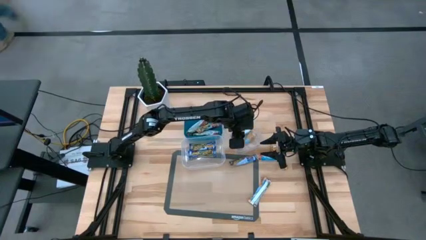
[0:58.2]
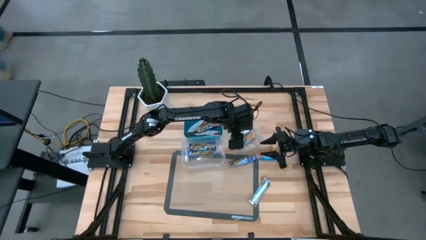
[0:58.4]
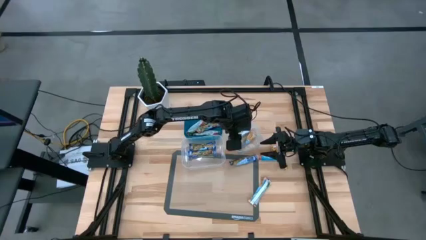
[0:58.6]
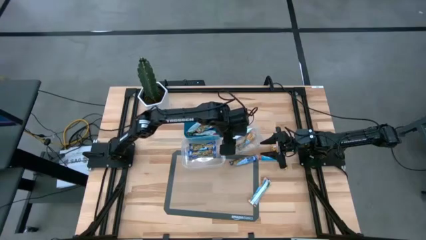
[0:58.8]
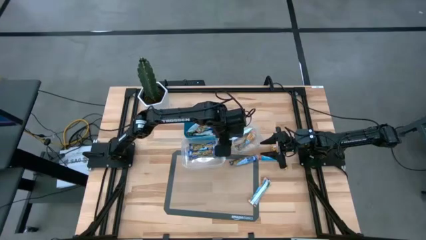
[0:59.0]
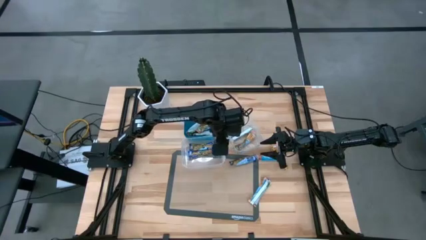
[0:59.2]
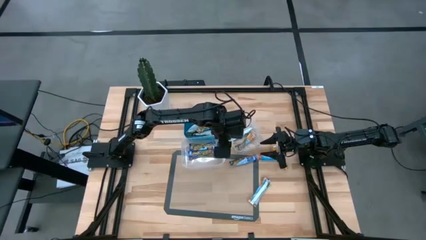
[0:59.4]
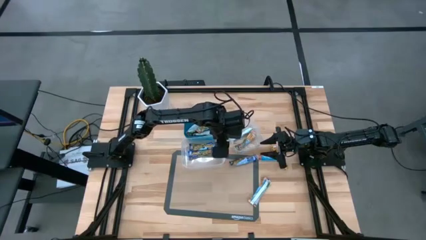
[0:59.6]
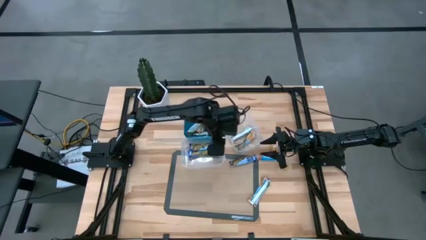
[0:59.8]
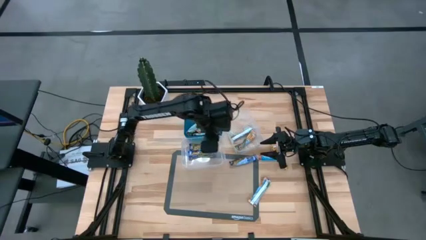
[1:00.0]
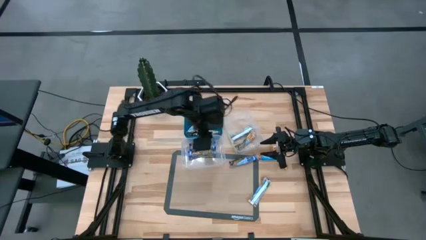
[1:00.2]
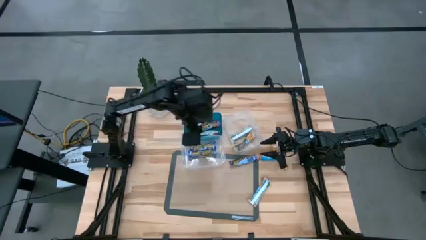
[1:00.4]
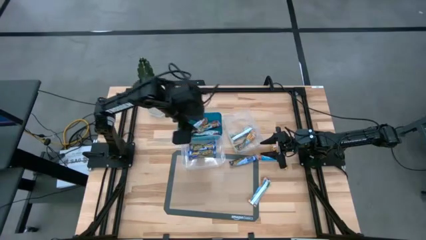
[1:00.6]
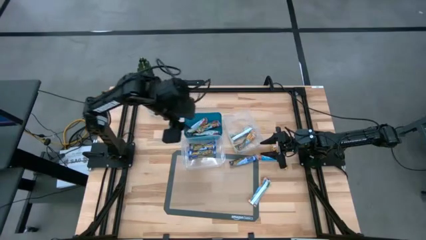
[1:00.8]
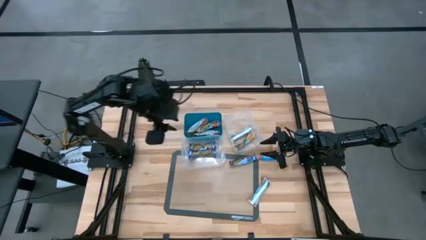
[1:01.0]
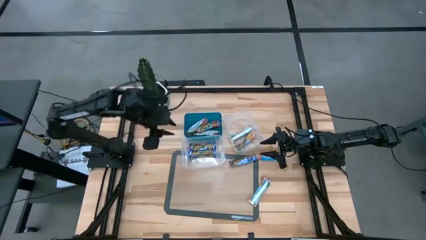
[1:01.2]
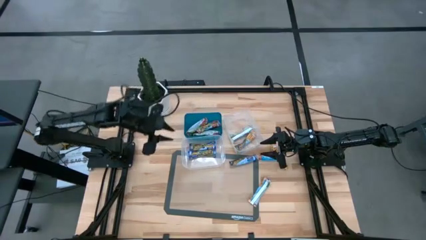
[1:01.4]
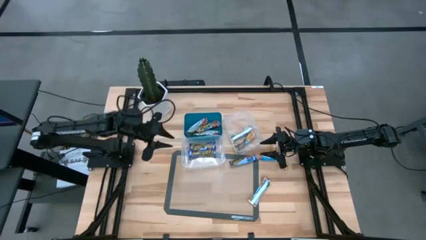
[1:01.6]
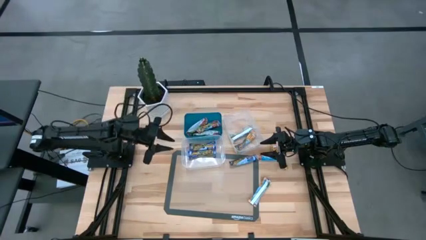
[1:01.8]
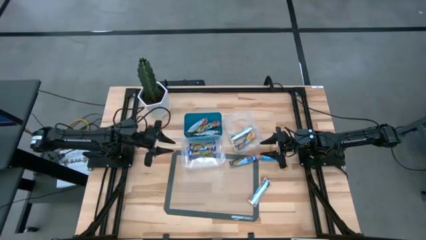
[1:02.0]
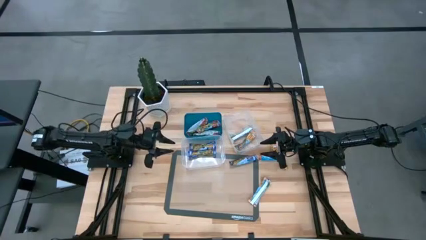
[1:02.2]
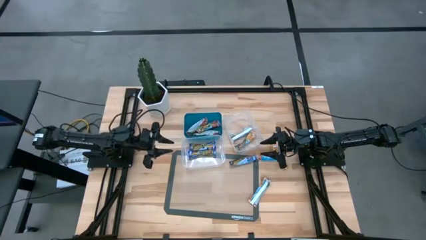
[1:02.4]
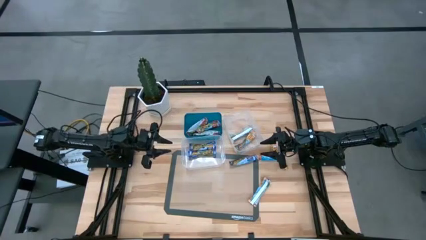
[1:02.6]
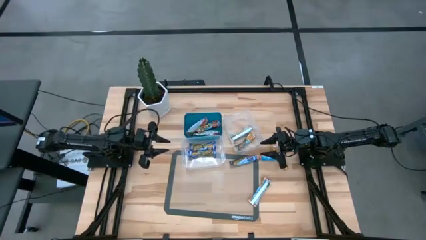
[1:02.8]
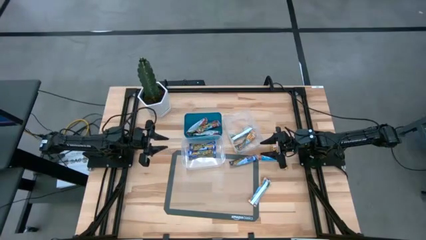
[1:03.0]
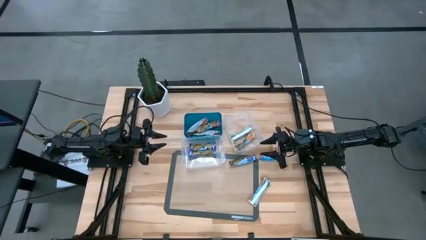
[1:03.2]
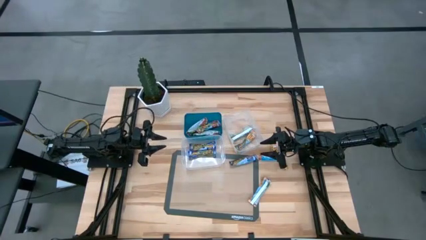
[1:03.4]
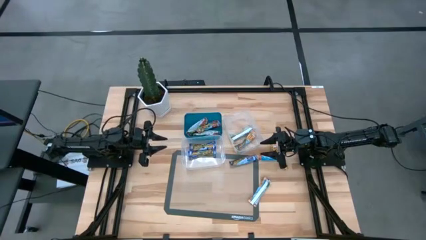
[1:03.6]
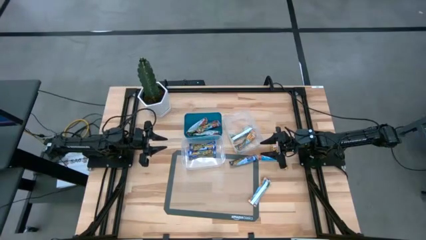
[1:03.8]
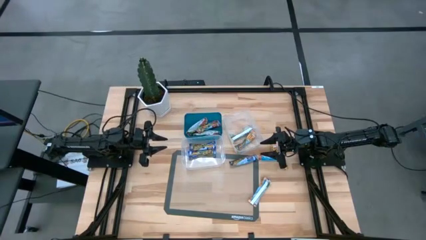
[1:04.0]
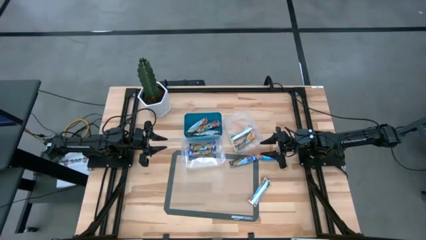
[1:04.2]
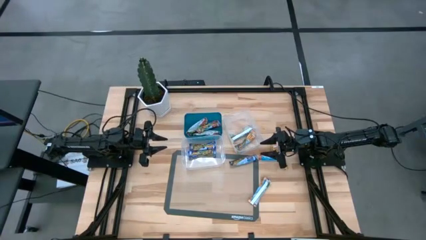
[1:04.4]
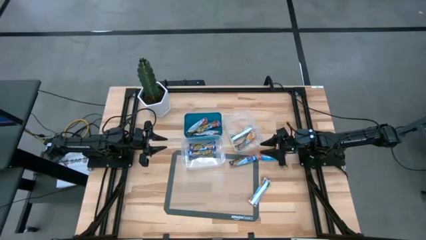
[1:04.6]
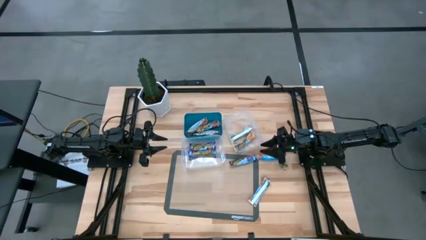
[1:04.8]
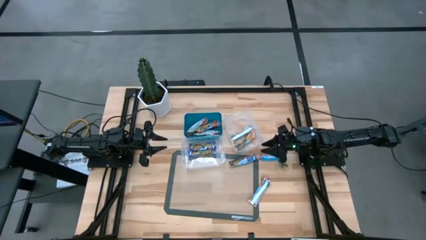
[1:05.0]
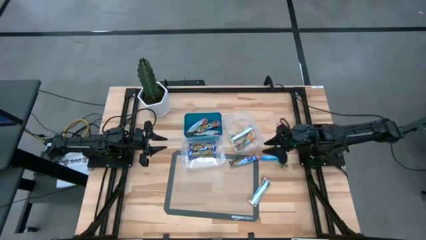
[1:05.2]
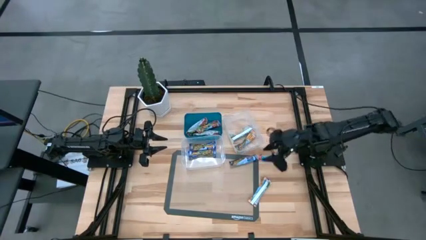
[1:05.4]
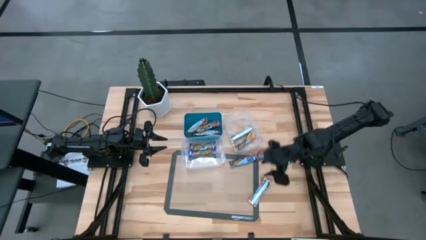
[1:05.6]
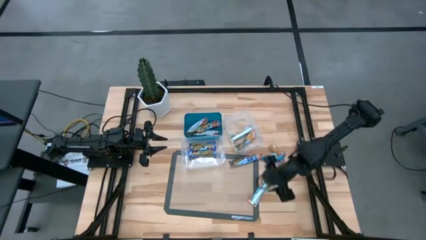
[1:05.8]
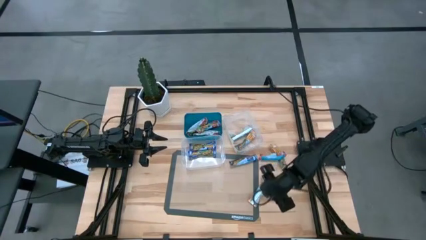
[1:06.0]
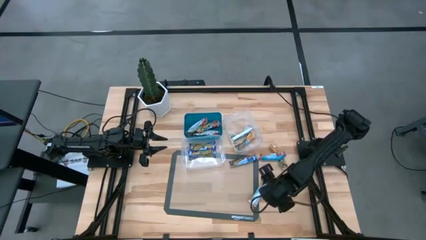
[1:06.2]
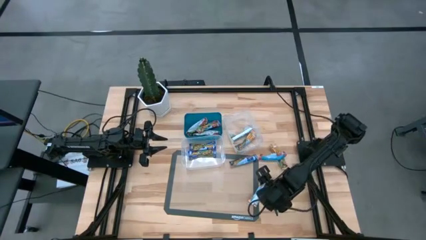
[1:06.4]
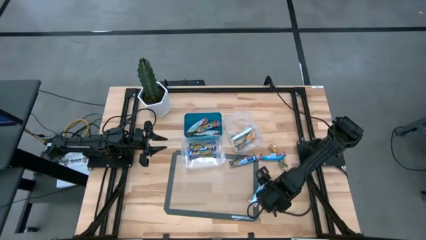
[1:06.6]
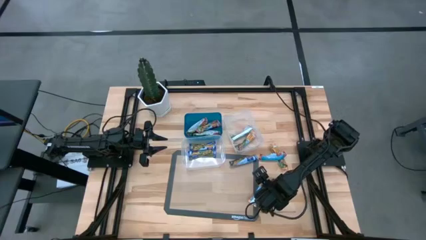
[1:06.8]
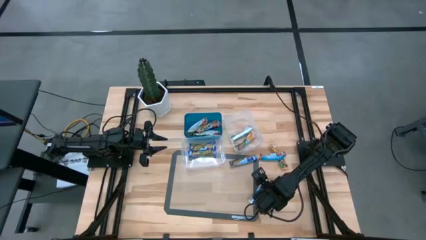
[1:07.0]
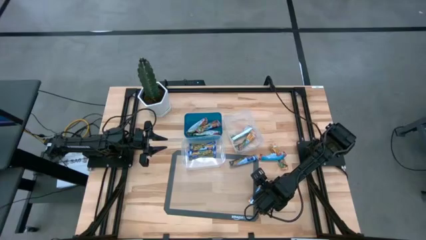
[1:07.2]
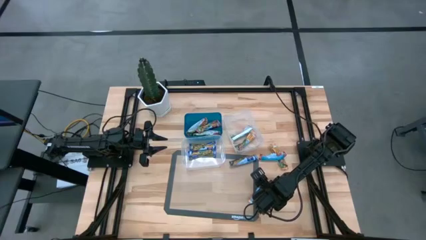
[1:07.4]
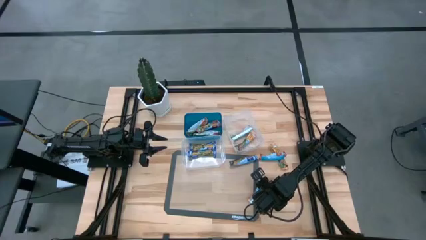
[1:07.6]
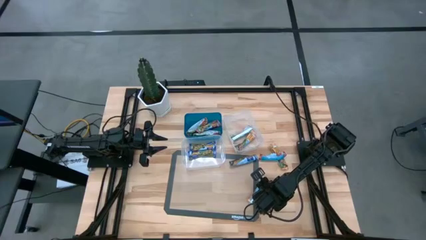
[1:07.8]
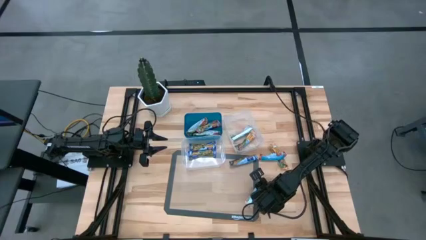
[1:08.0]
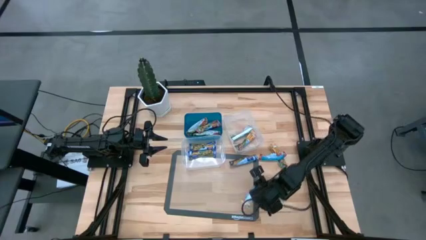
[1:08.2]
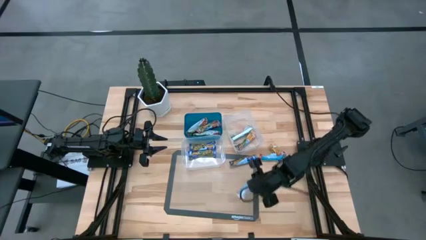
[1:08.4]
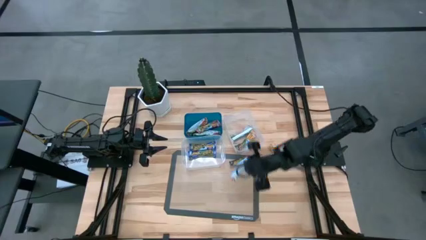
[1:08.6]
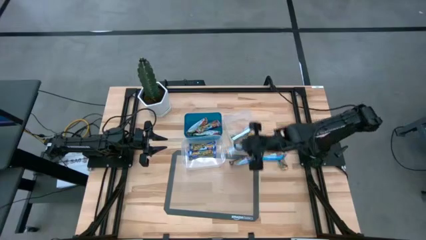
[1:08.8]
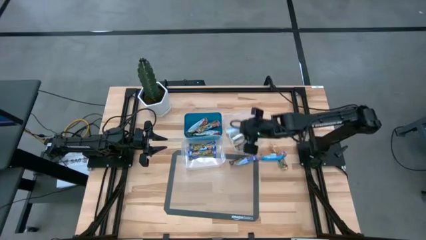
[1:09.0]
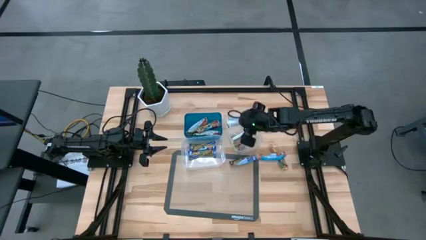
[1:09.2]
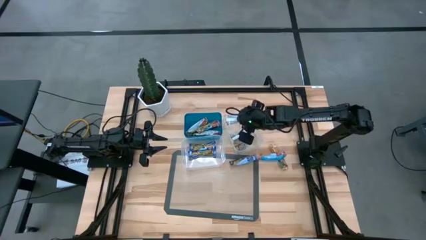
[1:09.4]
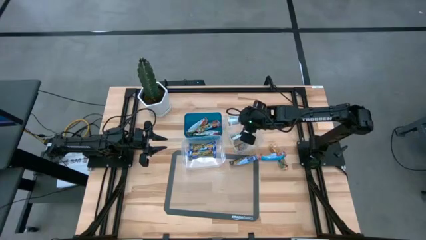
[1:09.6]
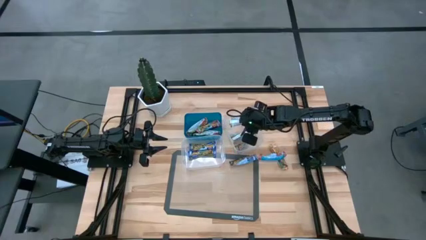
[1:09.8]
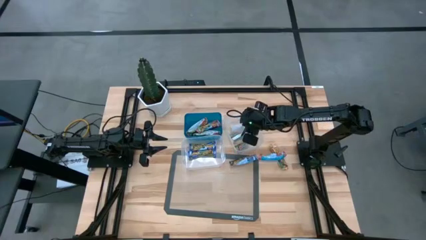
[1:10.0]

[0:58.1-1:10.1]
Task: Pick and place Granola Bars by type
Put the orange granola bar into the right transparent bin

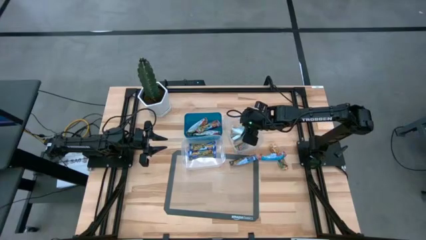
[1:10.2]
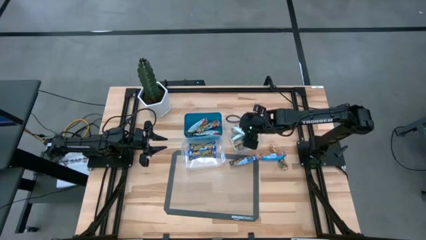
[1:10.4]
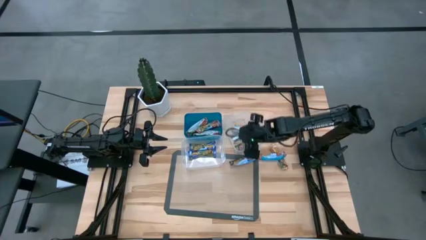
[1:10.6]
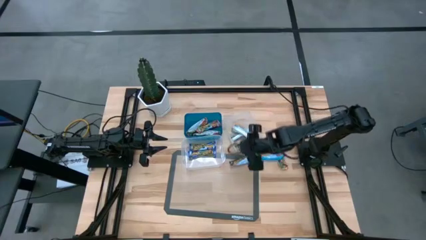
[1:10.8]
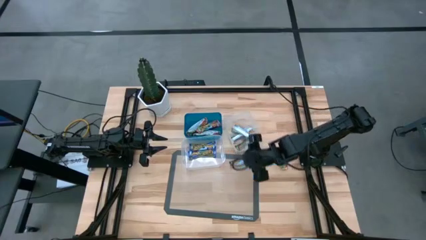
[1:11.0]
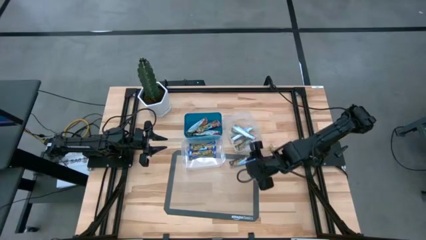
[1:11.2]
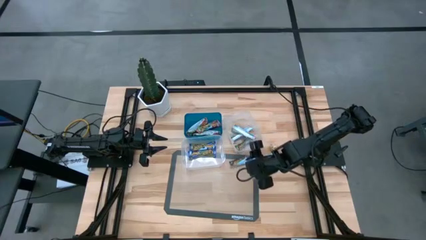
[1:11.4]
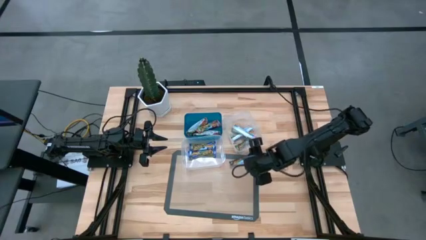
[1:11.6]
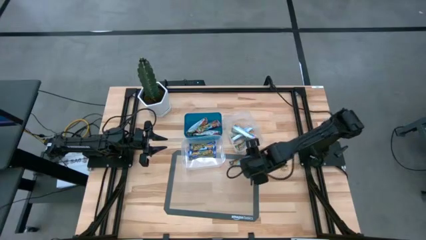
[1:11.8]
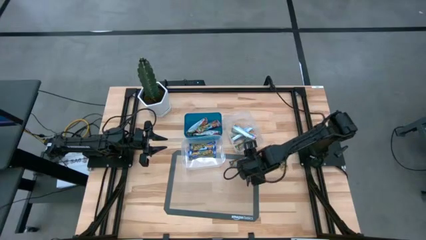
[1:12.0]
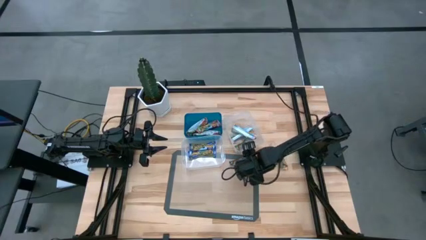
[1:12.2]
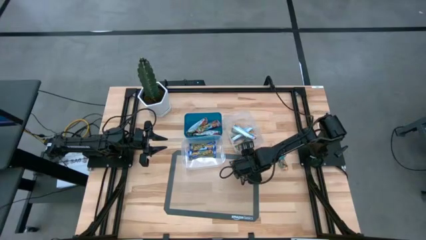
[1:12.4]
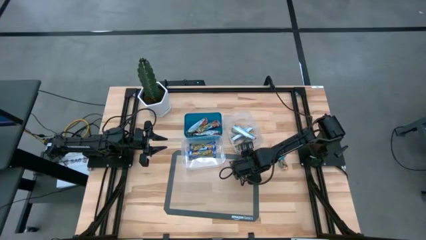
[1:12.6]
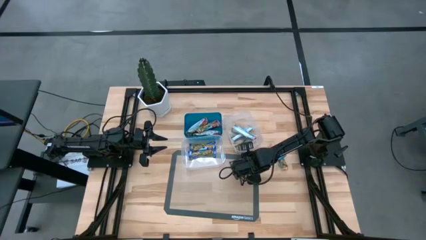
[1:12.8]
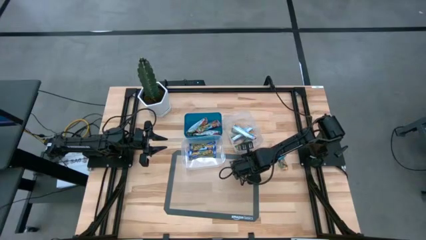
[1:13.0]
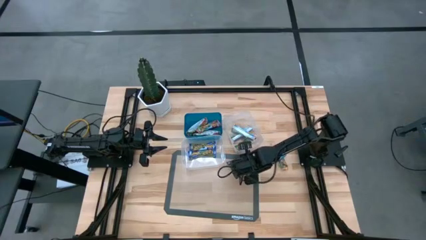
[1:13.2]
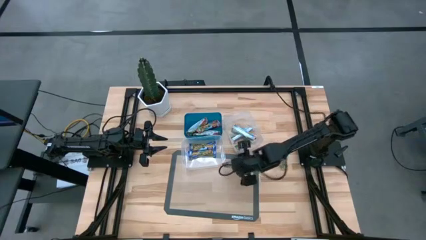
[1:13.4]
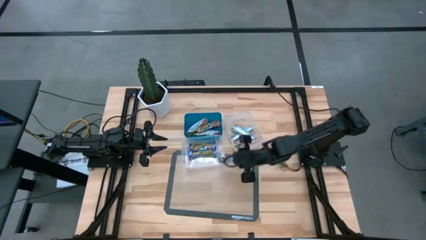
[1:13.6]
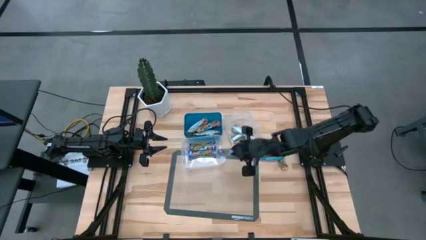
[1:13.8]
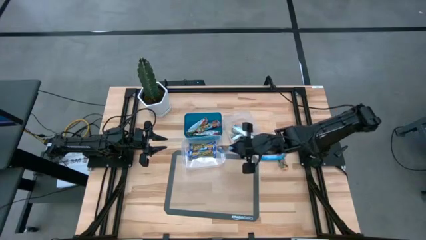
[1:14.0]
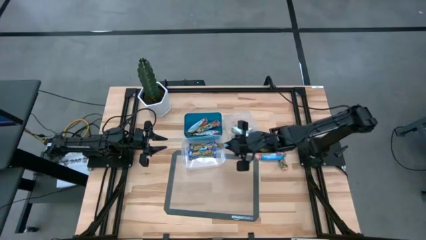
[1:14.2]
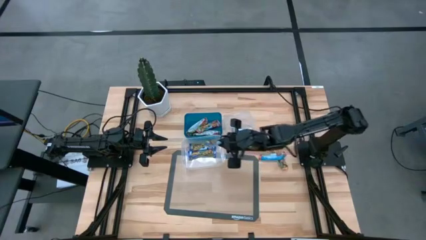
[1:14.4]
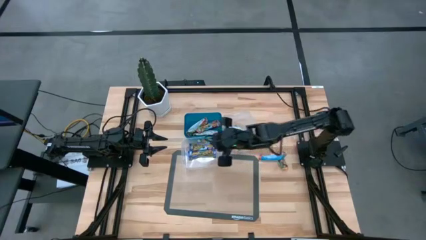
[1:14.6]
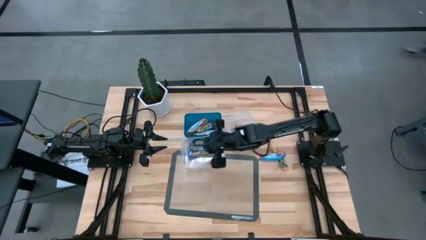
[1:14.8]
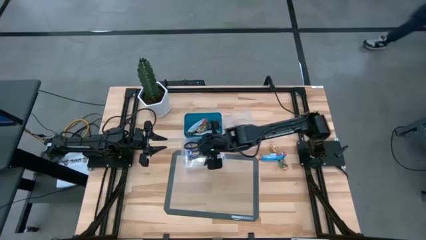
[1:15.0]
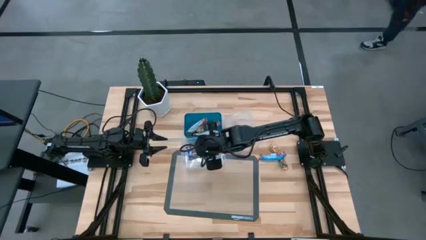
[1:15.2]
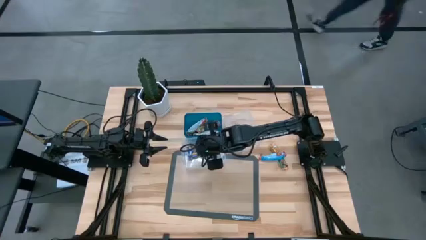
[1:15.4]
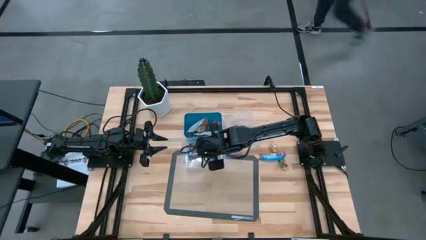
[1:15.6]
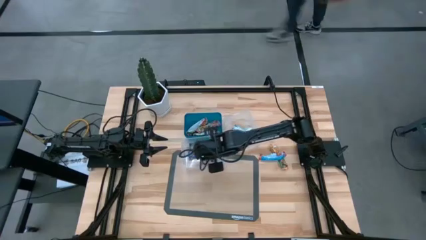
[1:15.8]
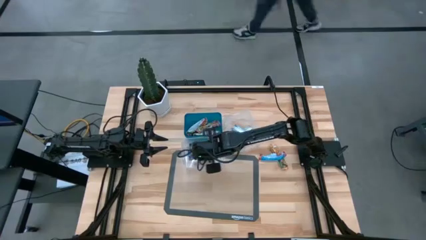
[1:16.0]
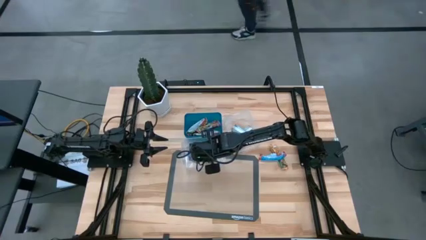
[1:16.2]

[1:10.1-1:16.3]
Put the blue granola bar into the left transparent bin
